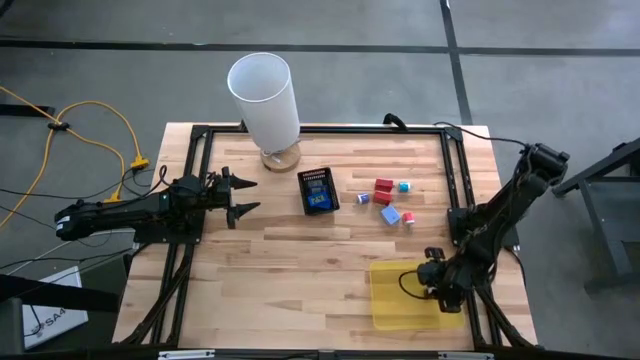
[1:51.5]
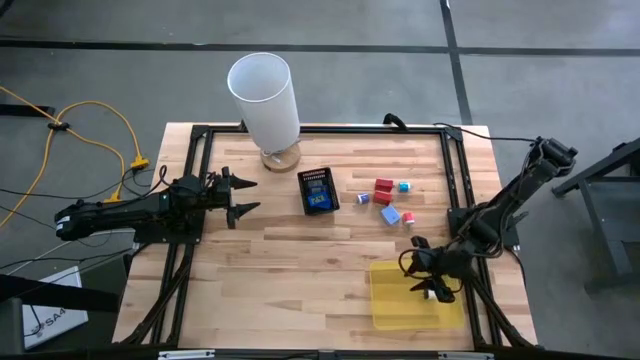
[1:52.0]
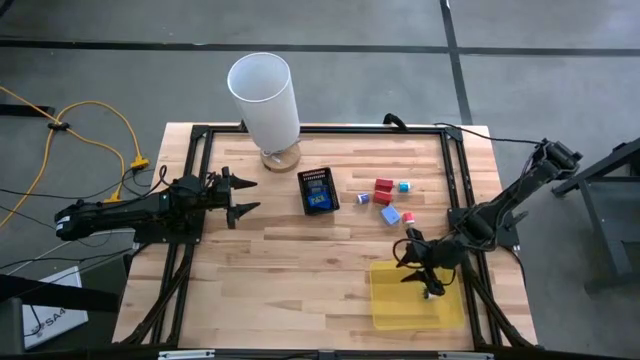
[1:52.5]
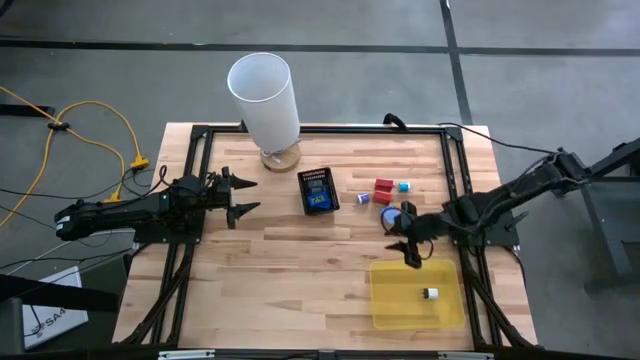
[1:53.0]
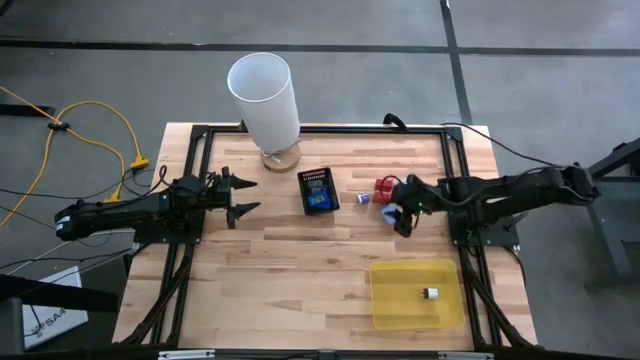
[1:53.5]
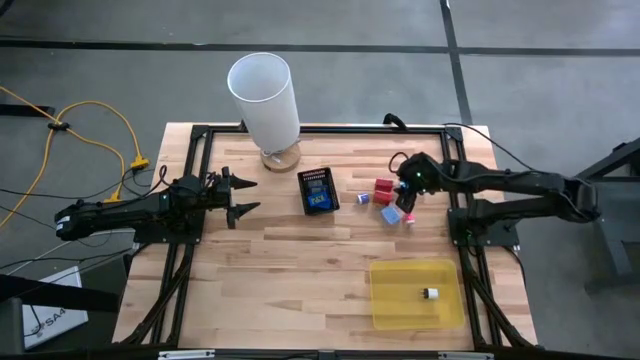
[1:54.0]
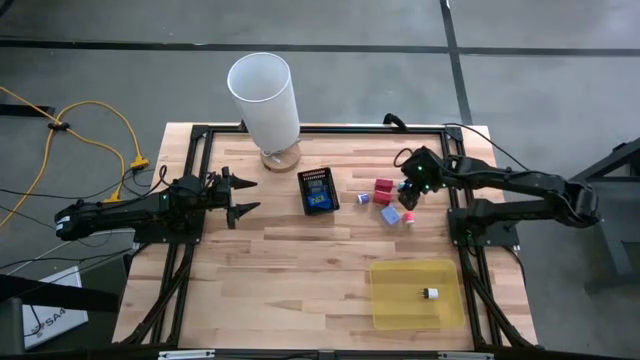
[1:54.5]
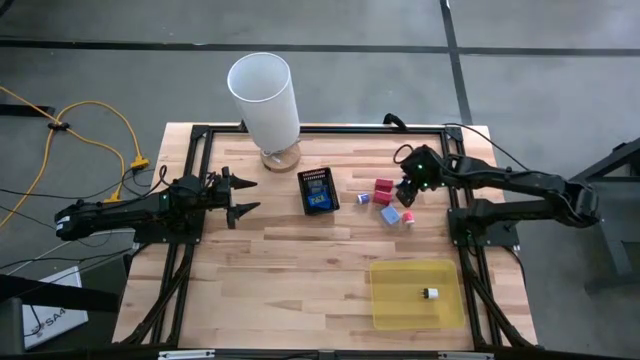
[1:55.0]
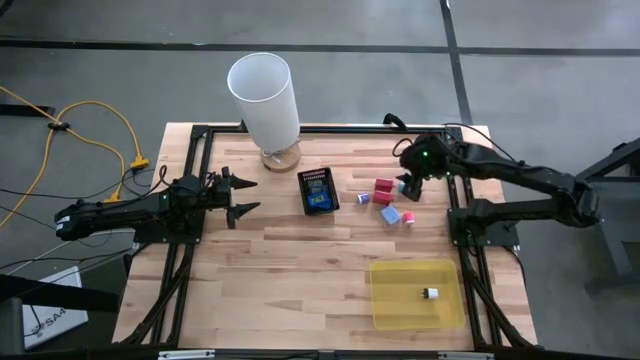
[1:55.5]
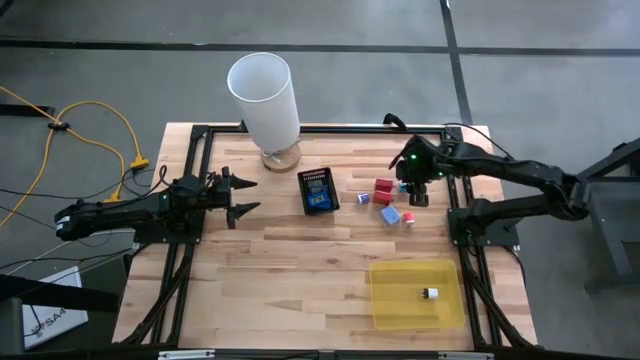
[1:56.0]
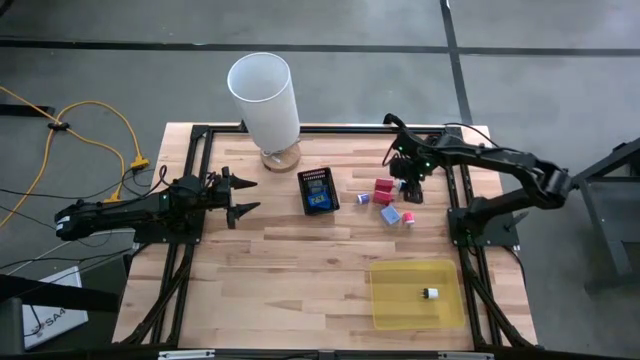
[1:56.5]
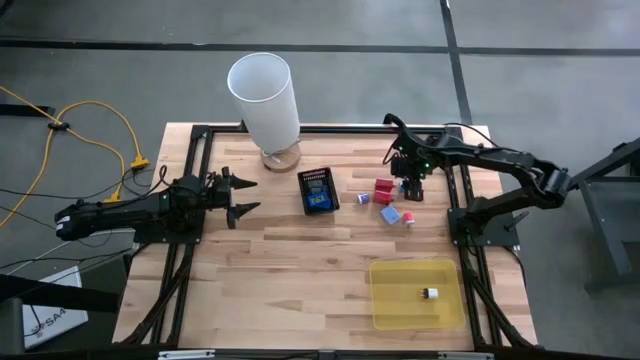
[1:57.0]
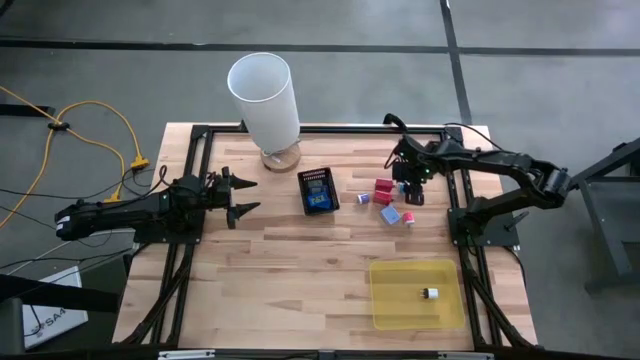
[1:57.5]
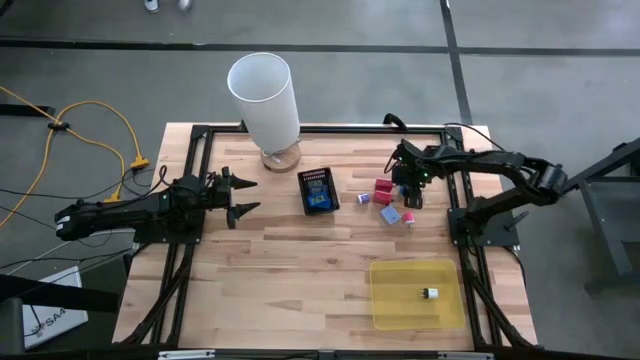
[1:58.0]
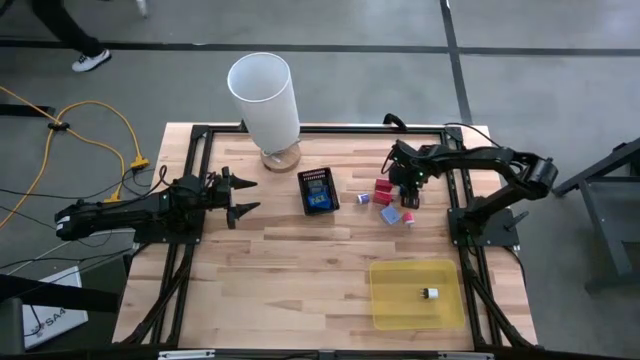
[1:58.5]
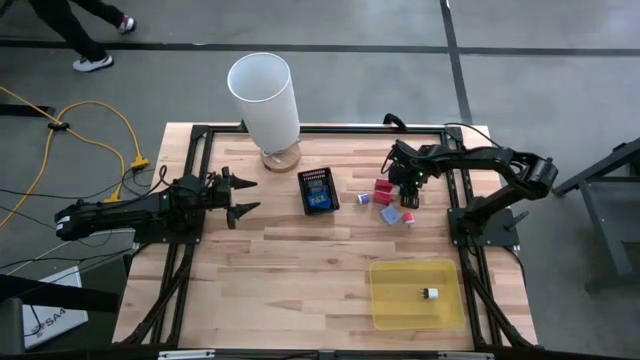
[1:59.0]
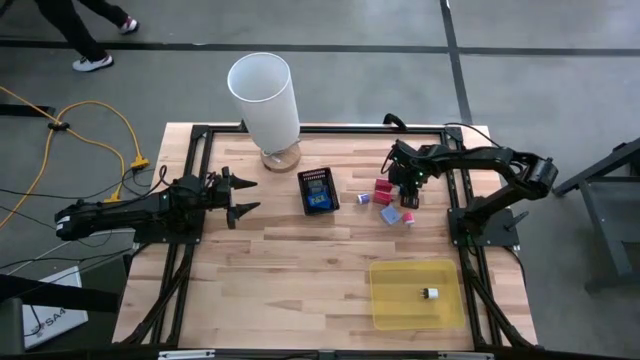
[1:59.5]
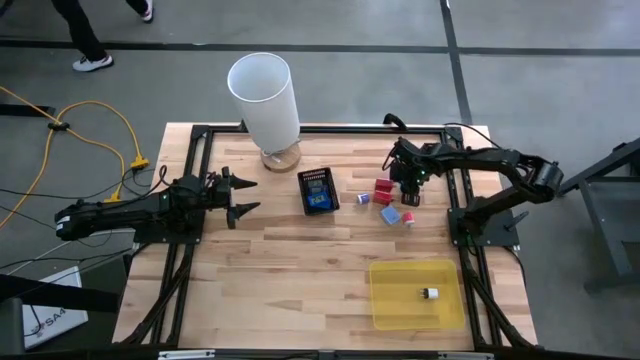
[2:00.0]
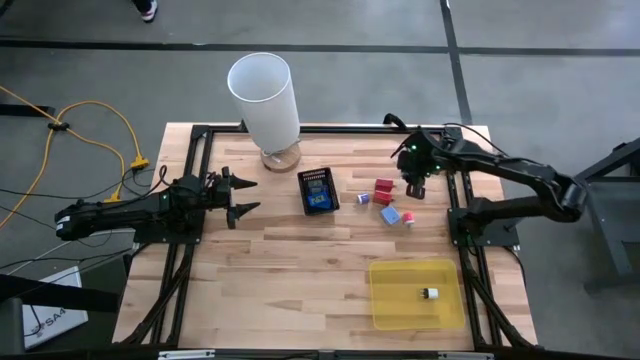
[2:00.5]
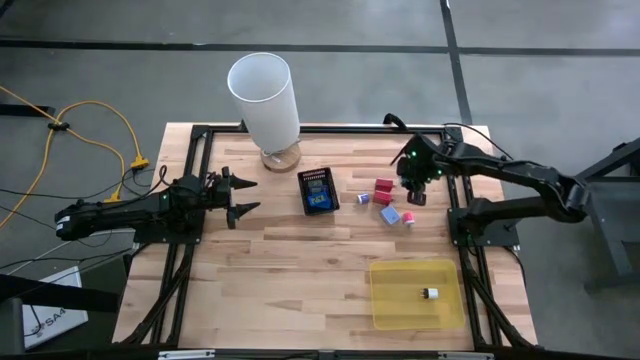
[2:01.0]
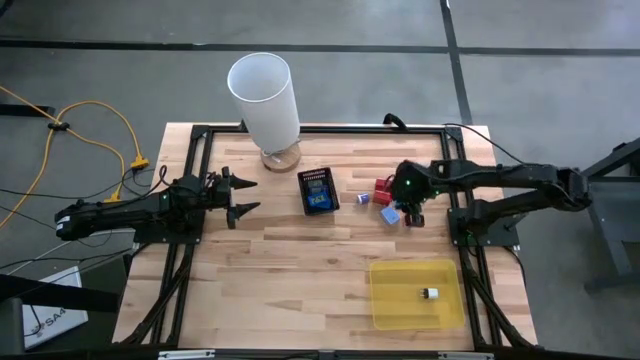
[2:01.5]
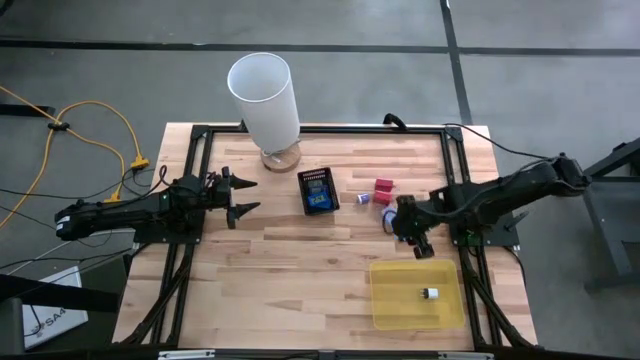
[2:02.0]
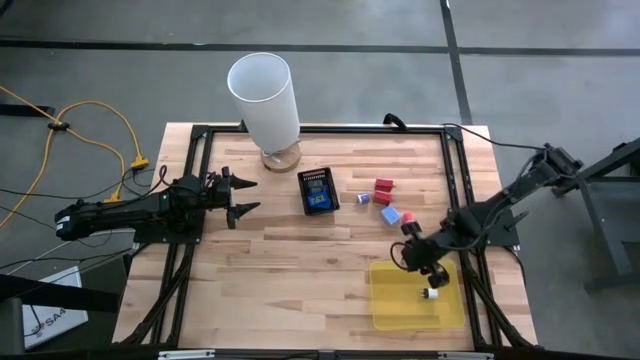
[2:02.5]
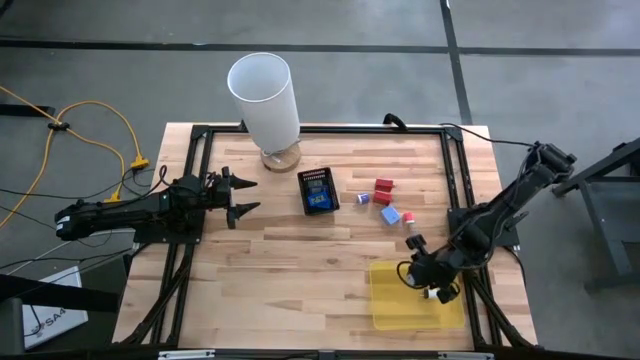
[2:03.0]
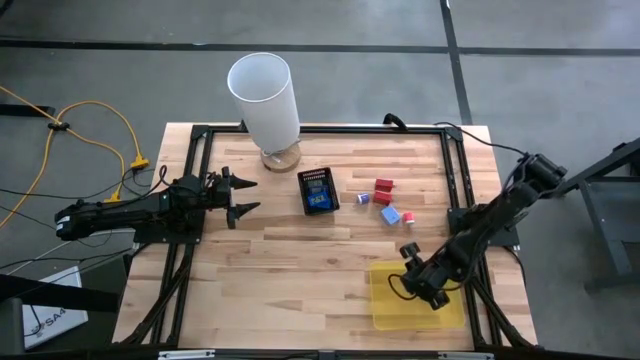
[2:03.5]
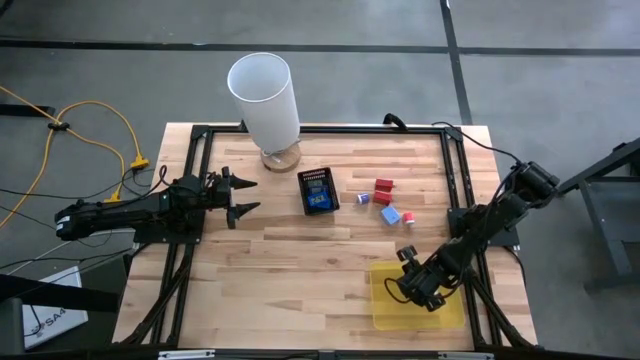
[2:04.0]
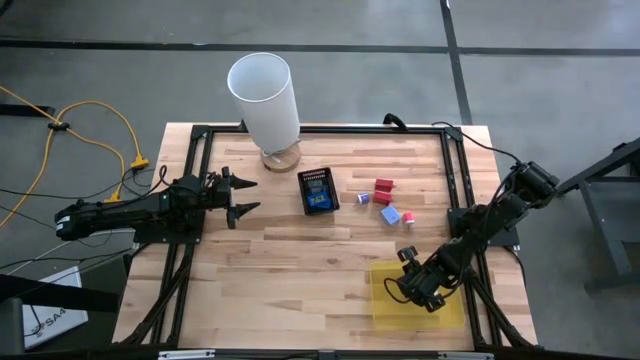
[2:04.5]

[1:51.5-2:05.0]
Task: Pick & Place Office items
Put the small blue charger adapter into the yellow bin

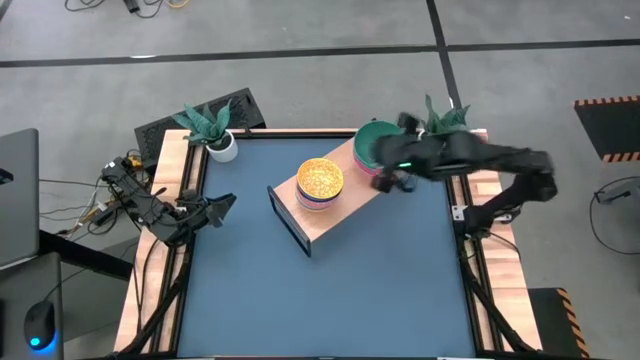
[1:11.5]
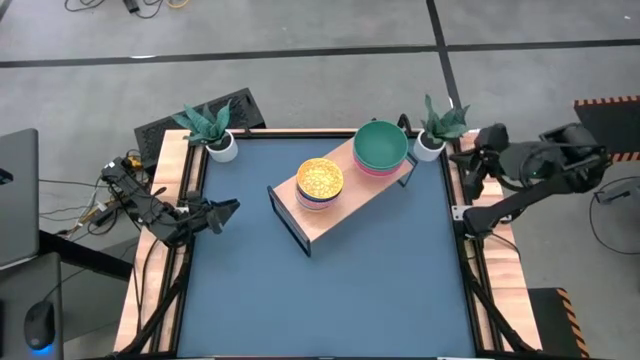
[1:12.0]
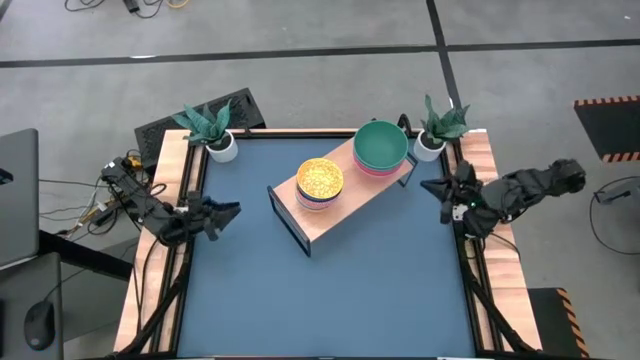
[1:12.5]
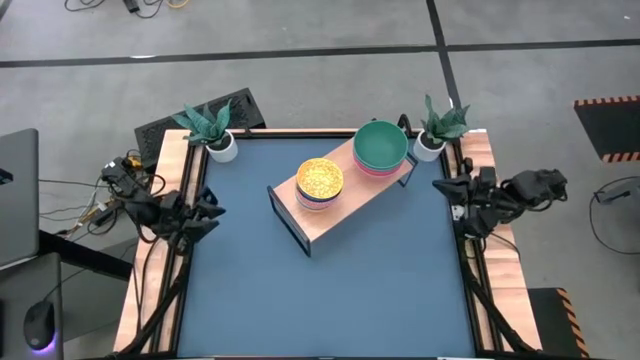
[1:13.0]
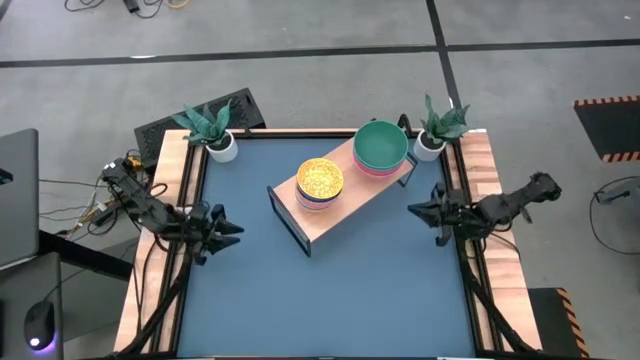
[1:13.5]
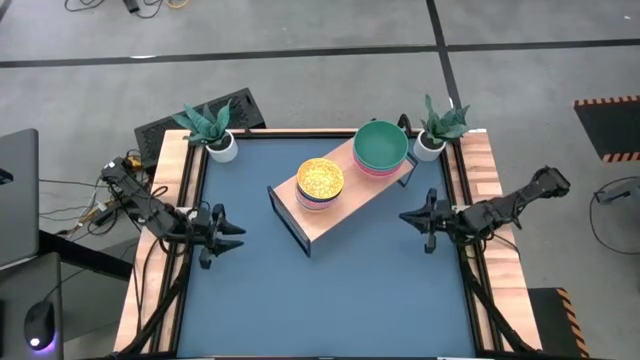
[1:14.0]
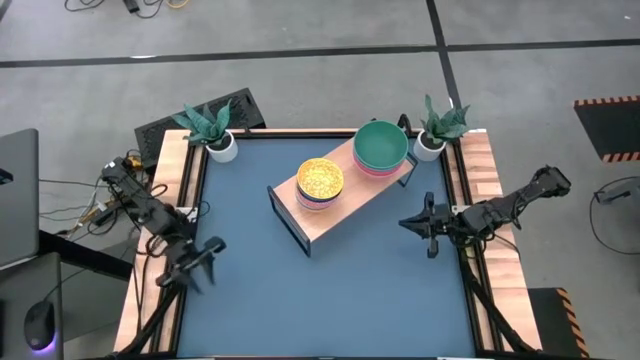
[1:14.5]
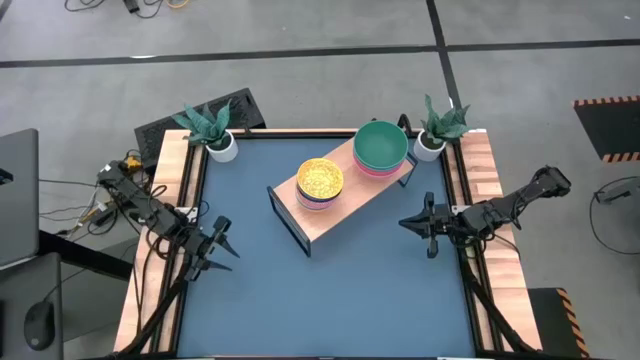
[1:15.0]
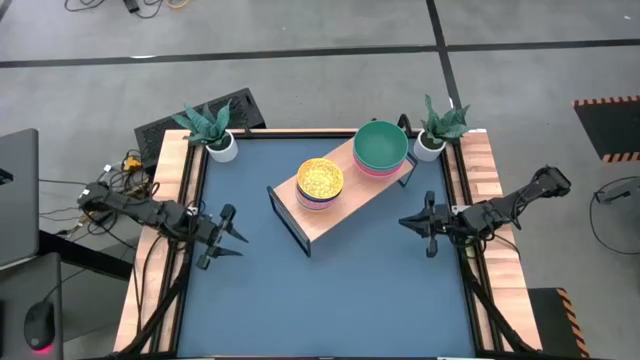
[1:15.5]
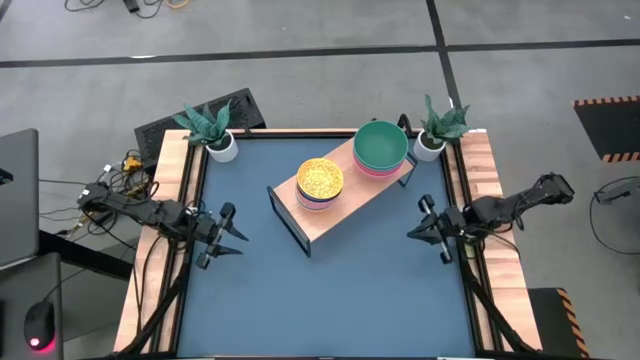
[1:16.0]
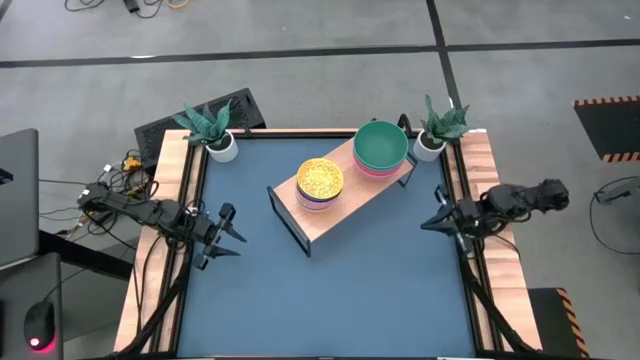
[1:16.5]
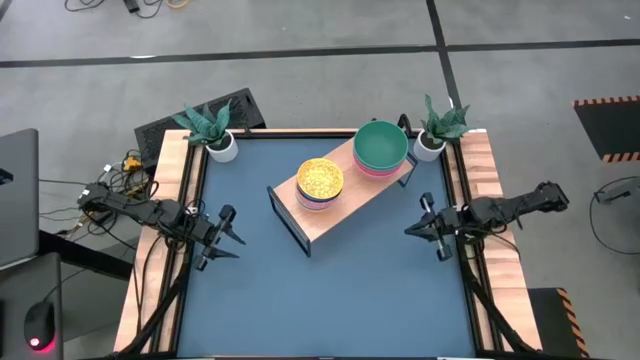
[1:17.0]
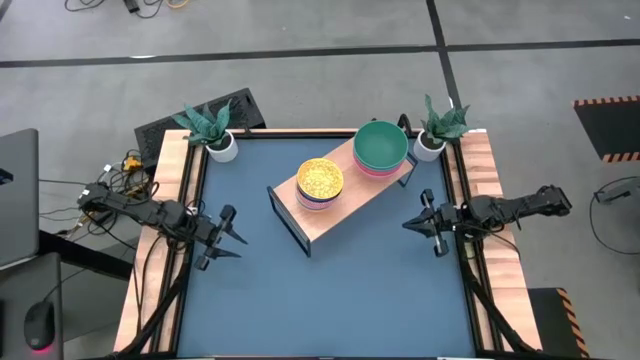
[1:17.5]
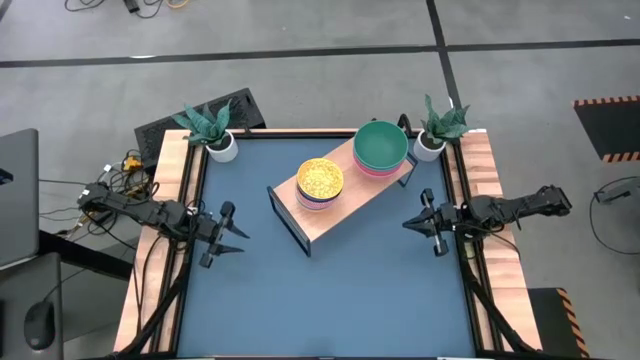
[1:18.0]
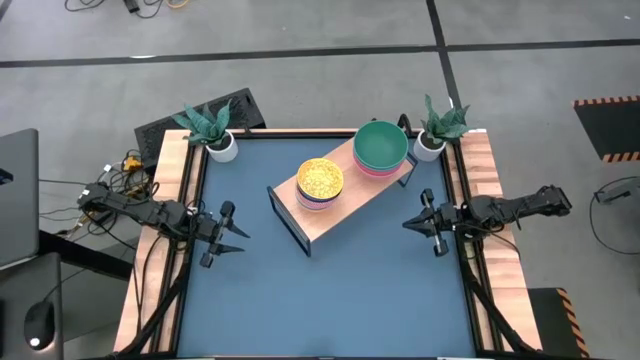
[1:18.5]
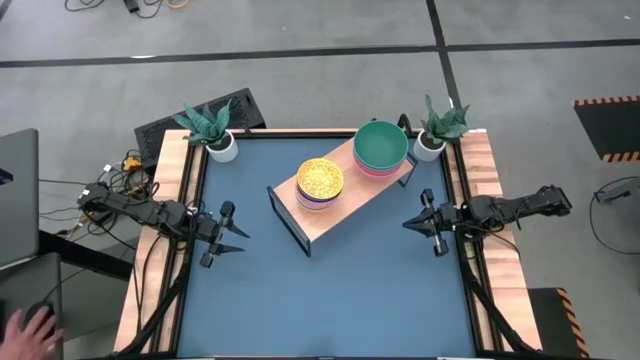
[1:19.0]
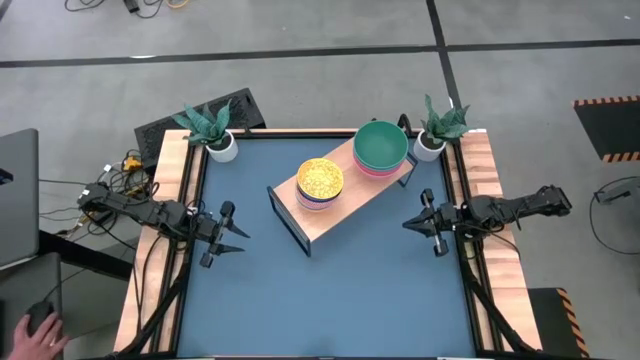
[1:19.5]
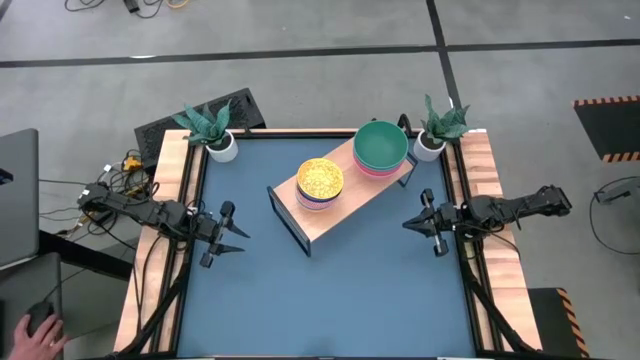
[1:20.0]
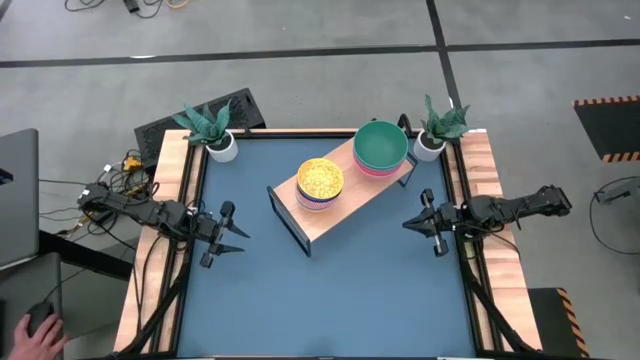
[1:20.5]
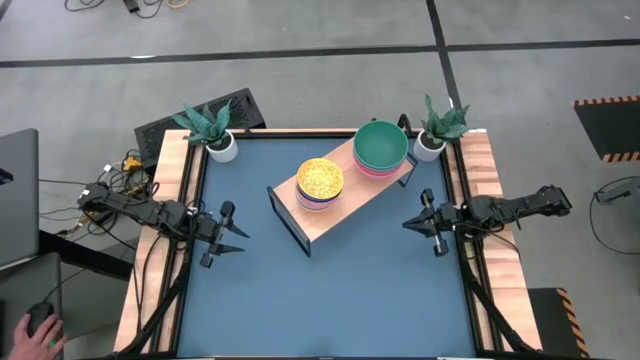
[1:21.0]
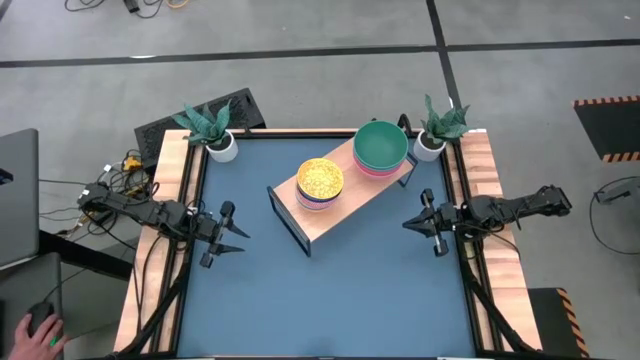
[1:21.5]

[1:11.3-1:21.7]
Task: Place and stack bowls onto a shelf
Return to Home Position
